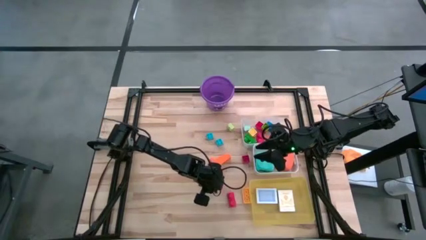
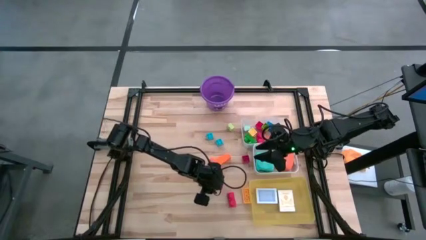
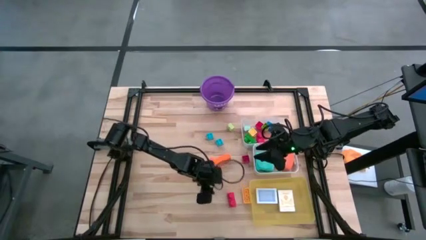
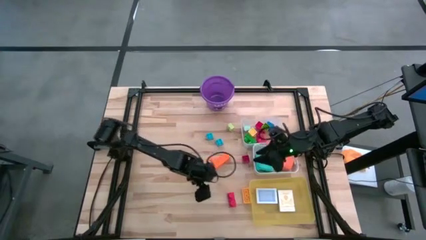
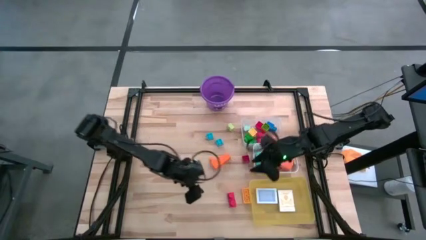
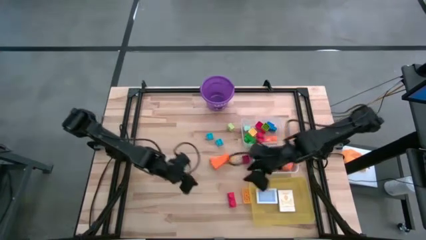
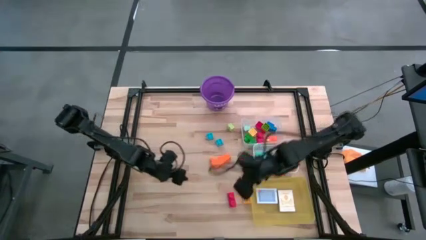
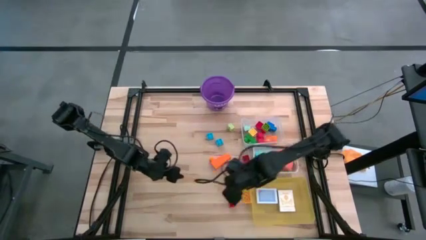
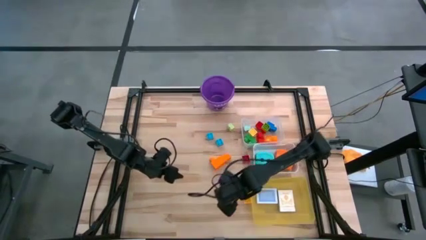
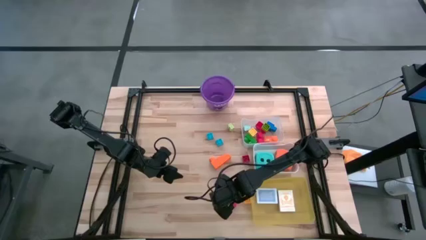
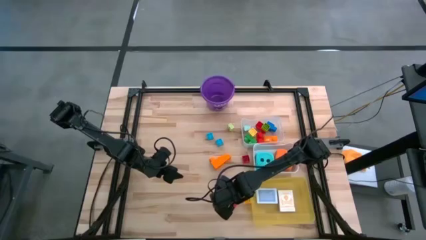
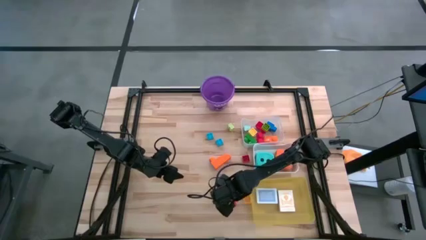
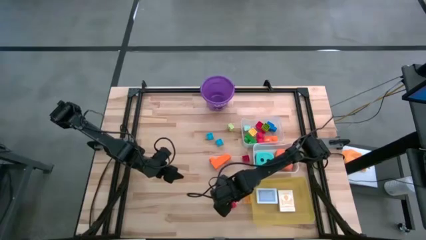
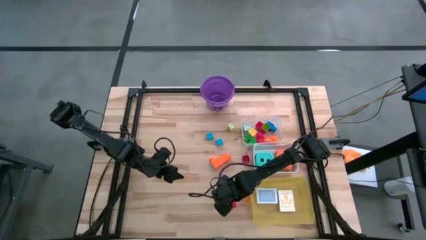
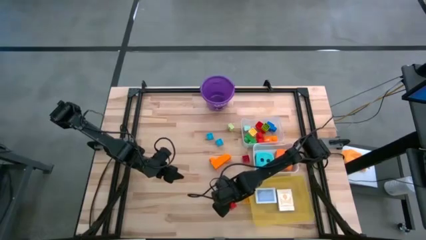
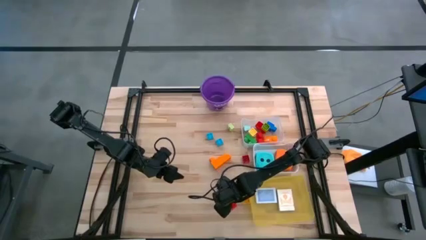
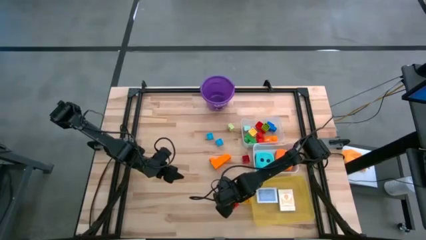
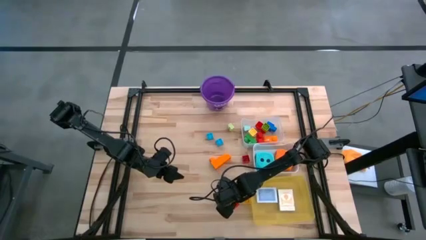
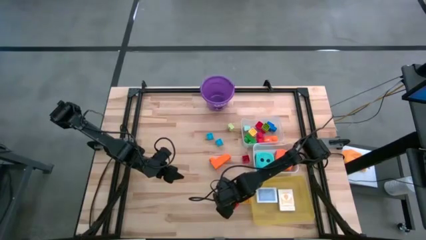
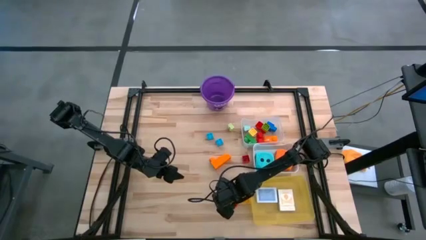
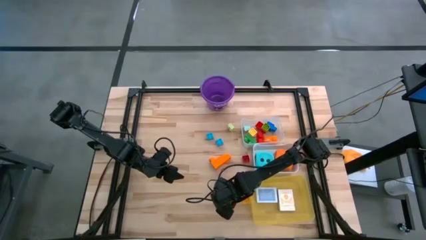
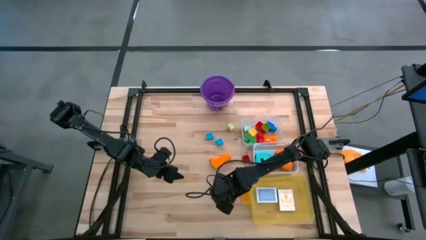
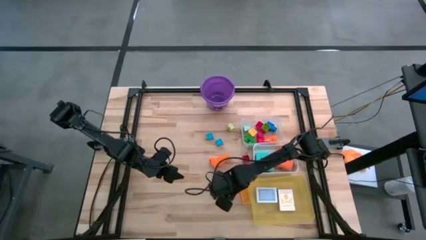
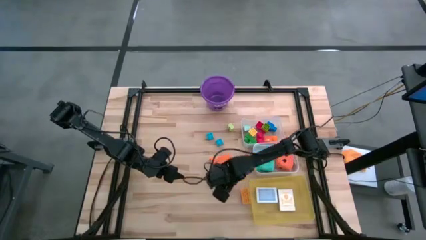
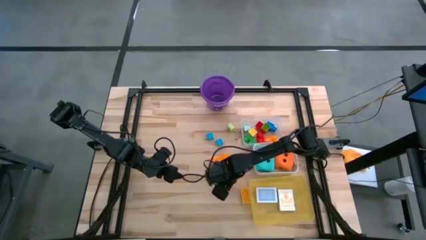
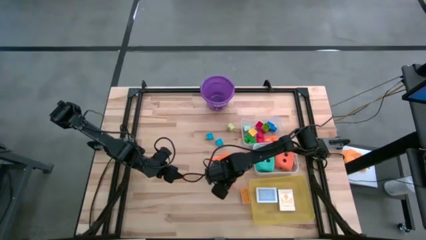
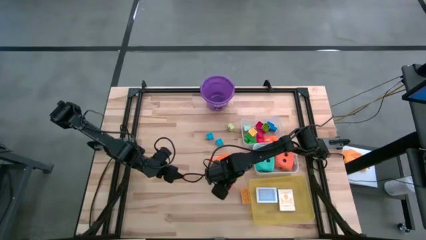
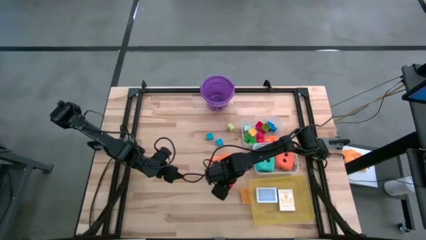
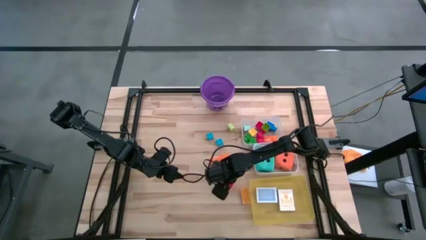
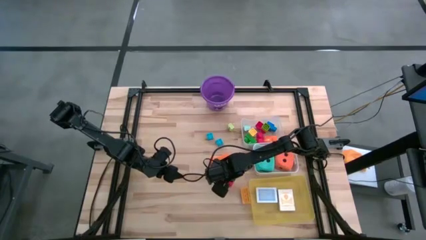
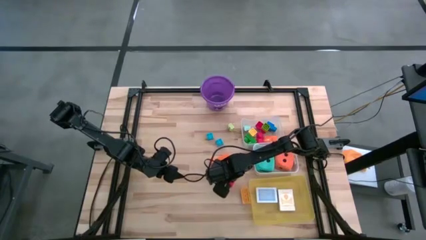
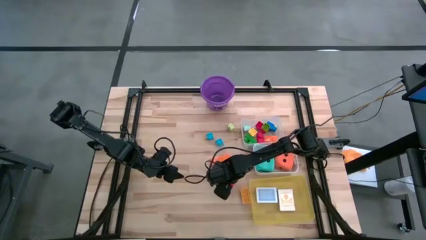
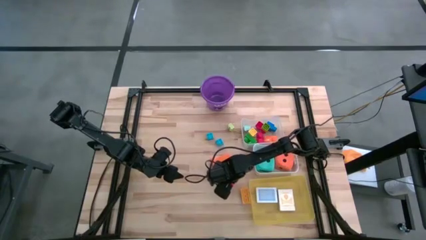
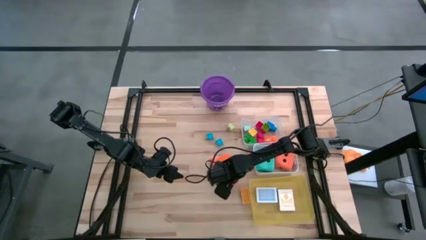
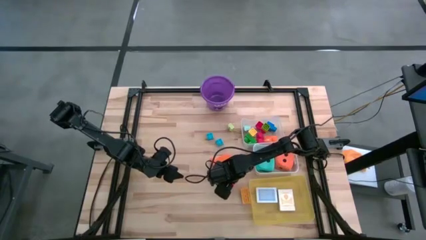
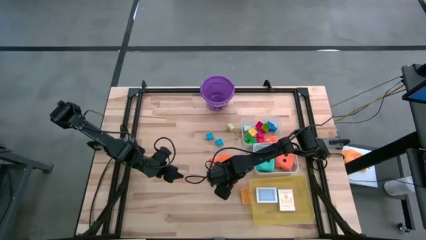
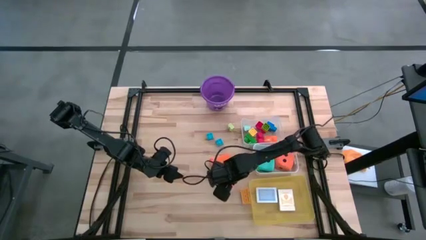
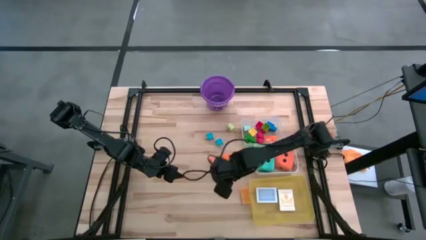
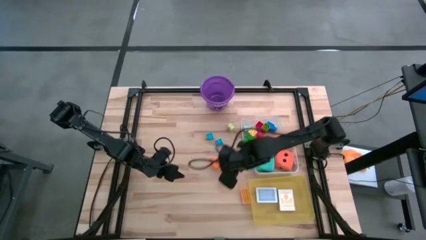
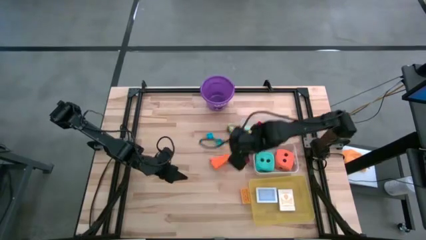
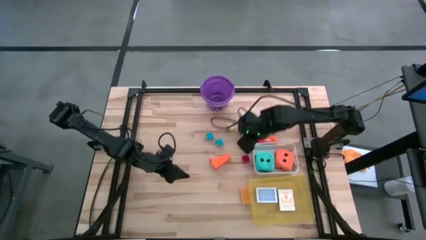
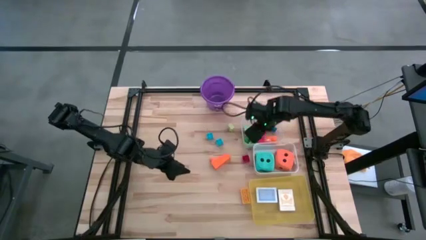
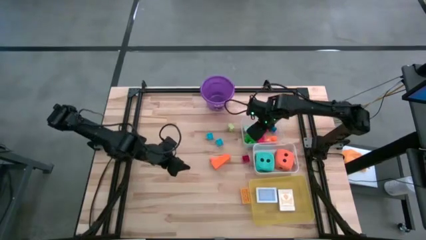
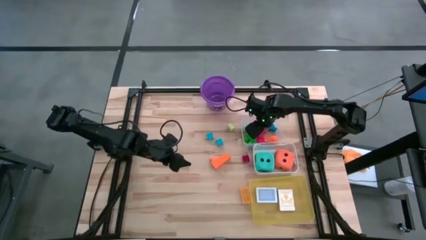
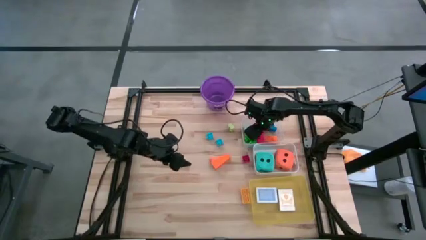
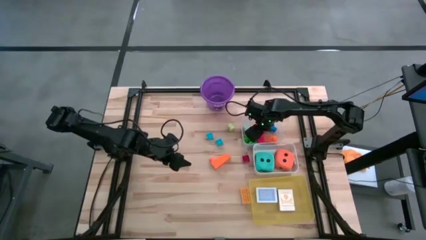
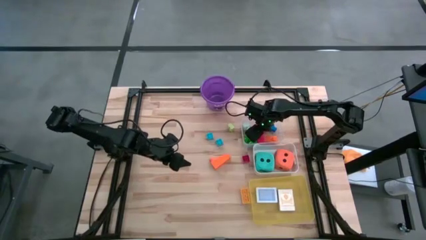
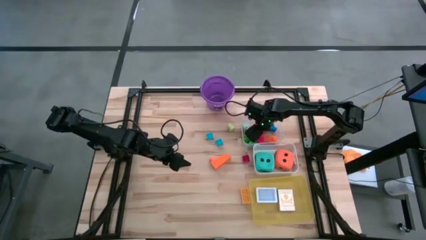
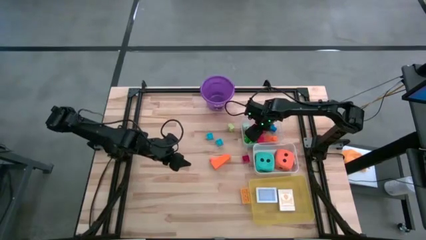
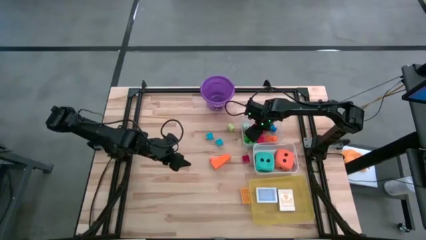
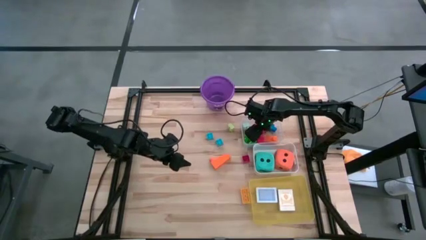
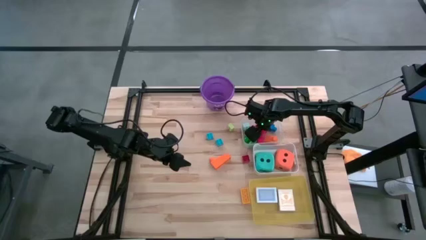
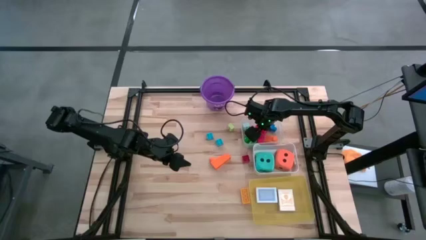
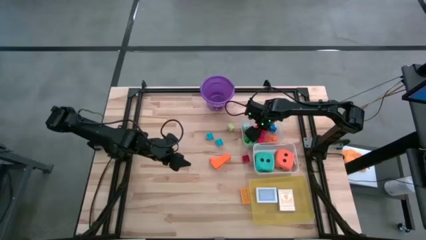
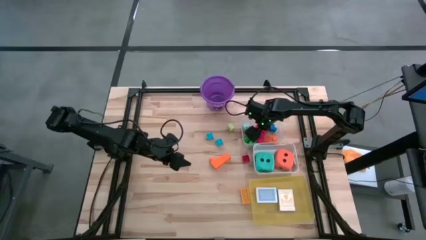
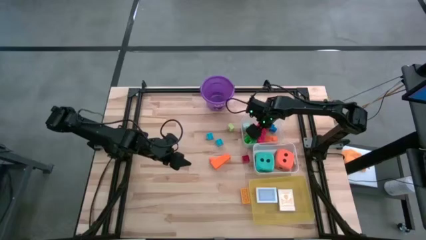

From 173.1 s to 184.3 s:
Task: Pick & Place Toys
Put the red game piece into the transparent bin

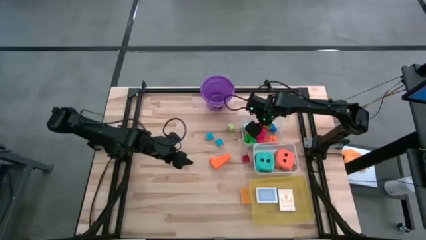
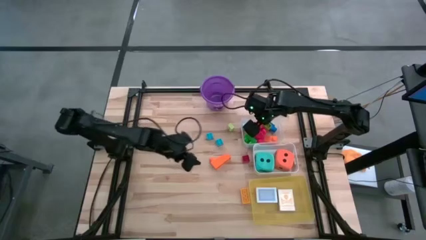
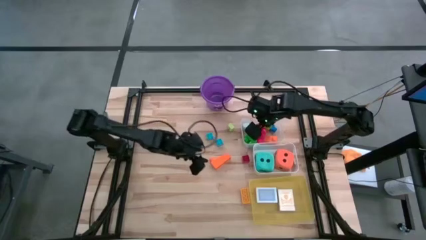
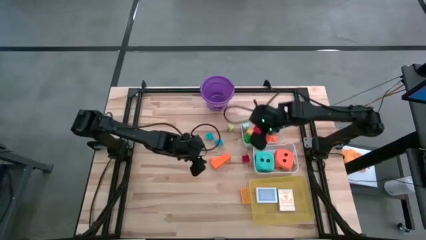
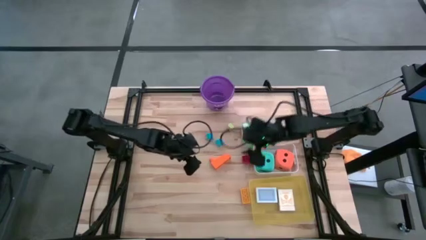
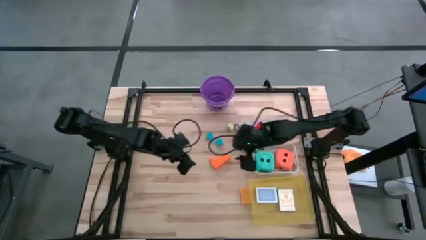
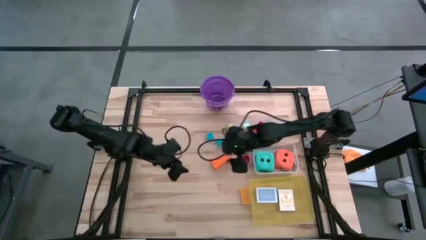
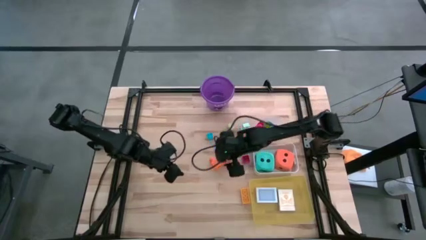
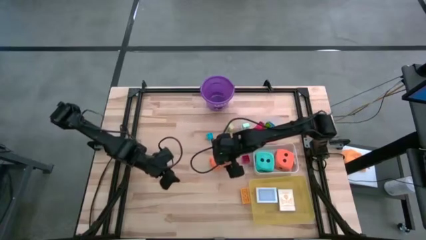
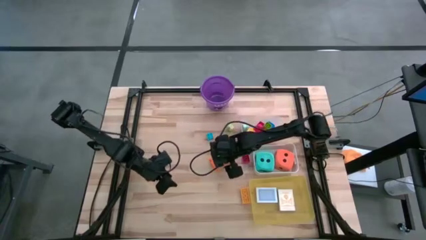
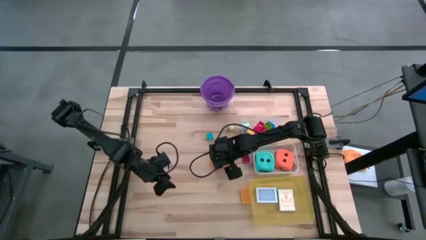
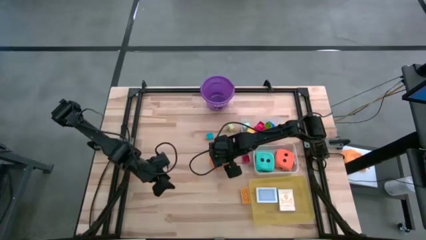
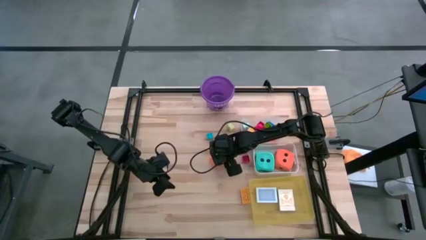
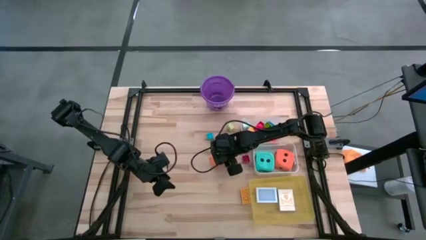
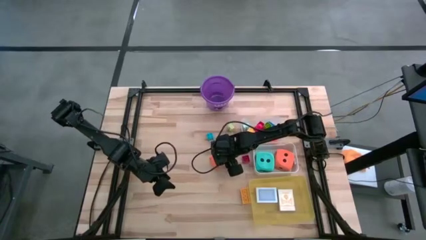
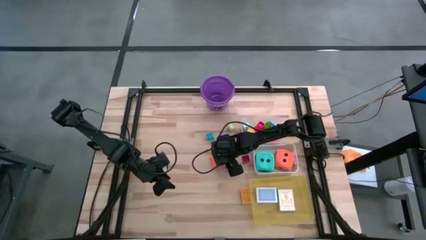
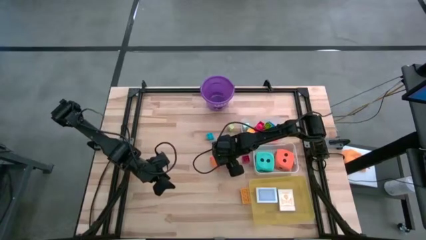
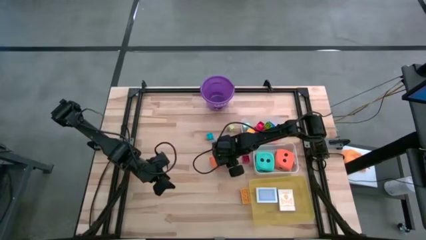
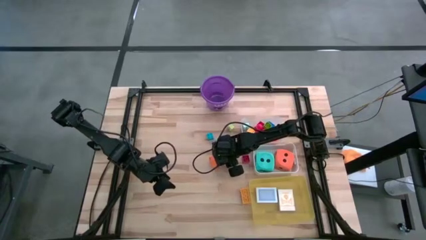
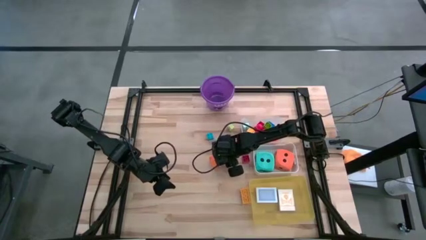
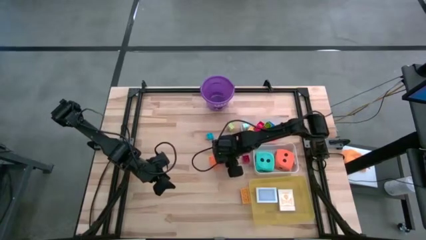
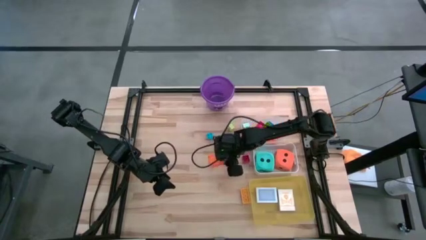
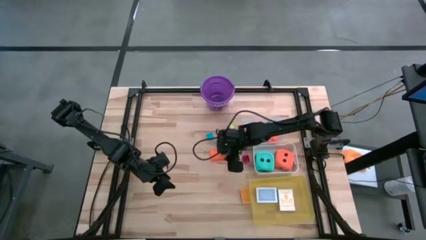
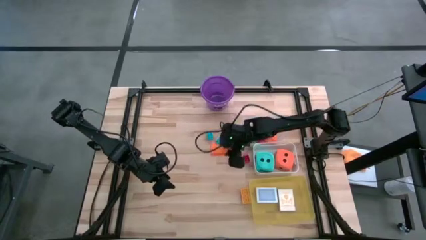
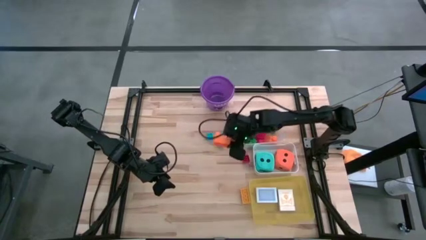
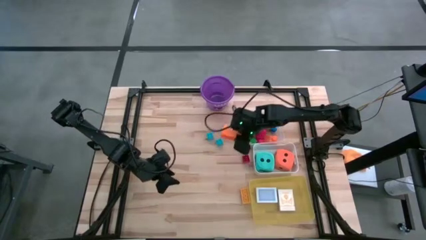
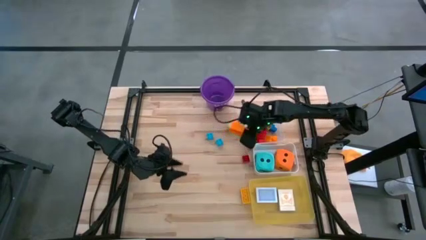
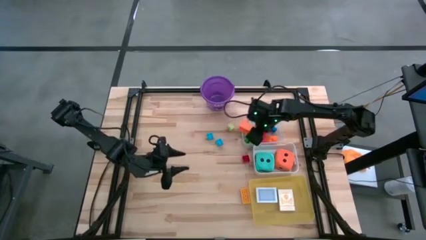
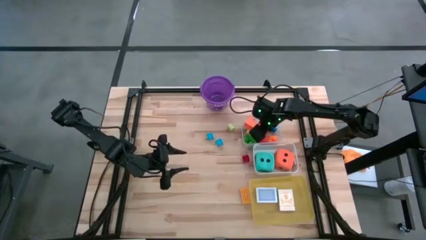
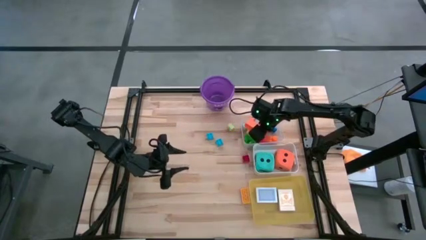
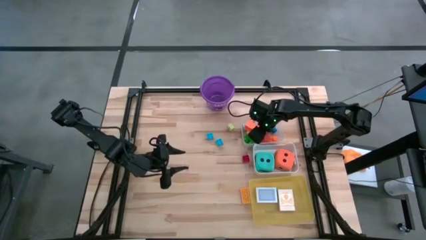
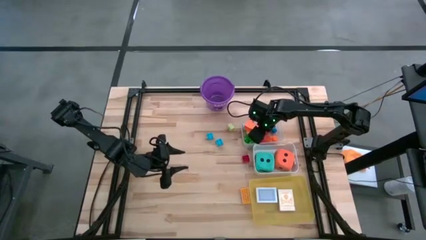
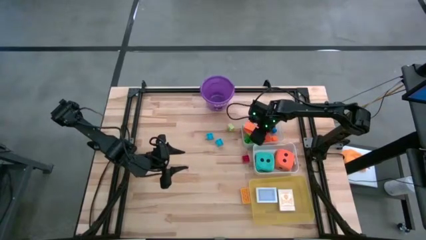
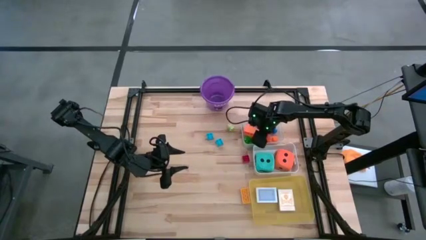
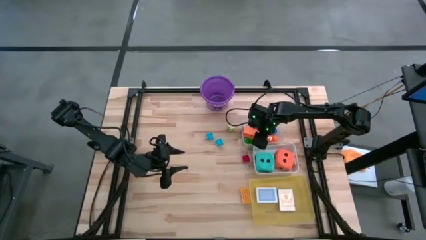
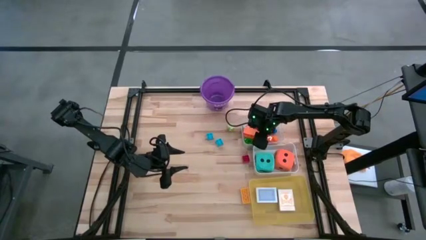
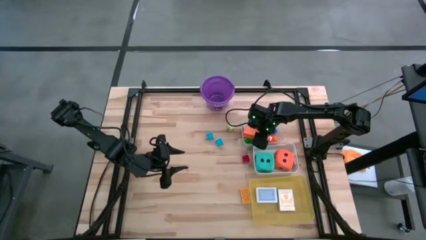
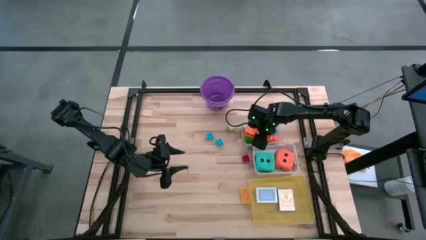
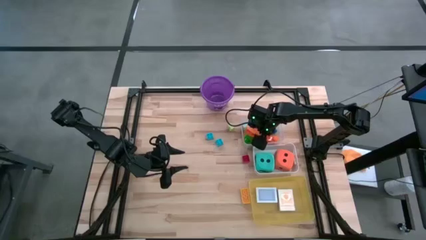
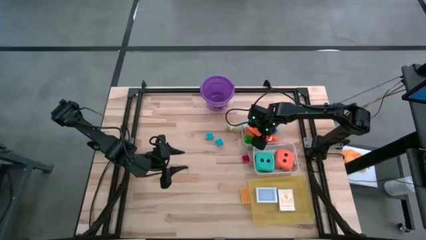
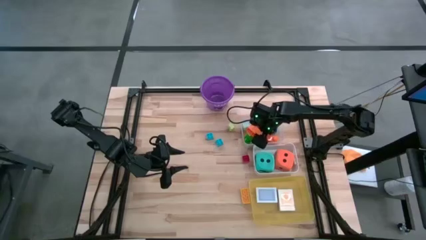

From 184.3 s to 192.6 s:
Put the orange game piece into the transparent bin
